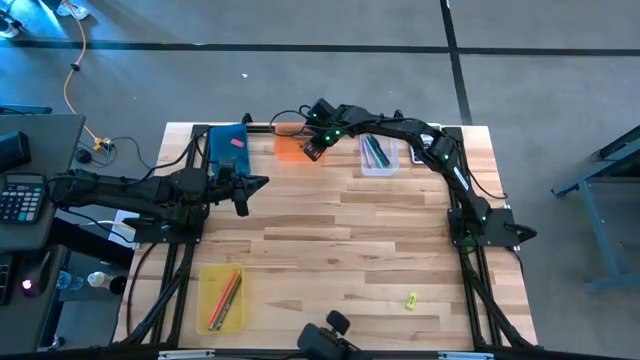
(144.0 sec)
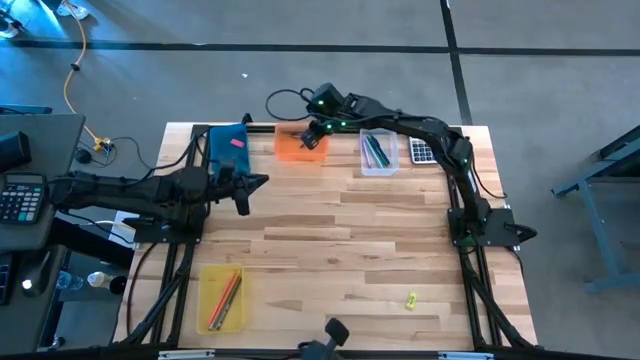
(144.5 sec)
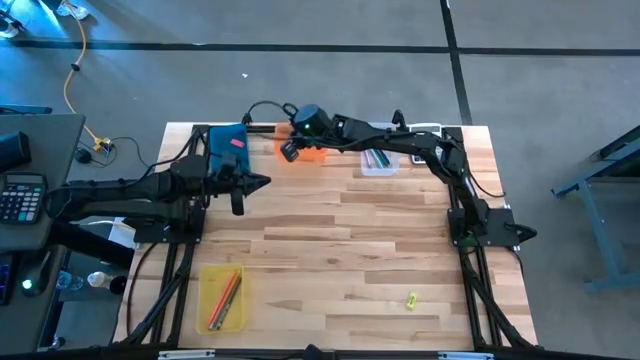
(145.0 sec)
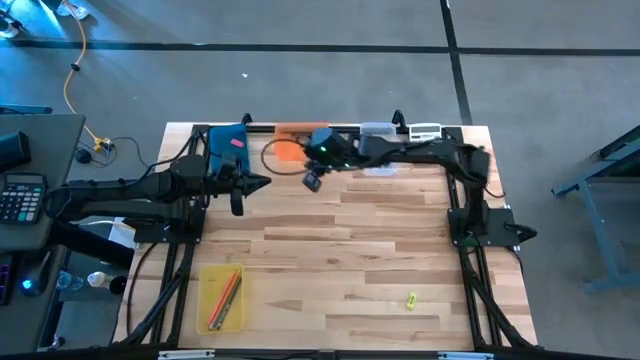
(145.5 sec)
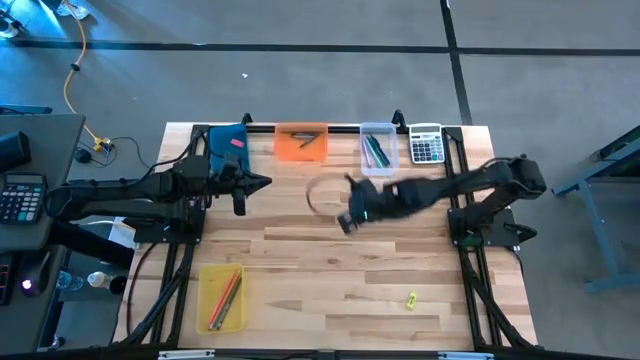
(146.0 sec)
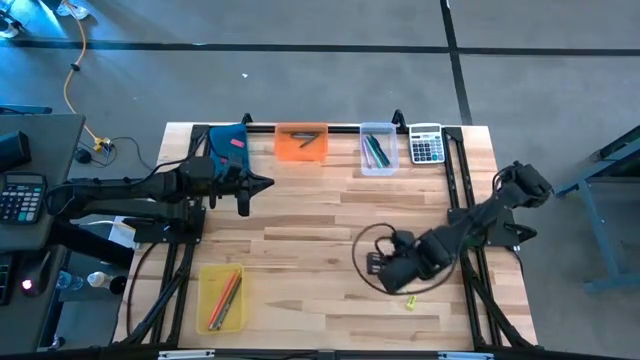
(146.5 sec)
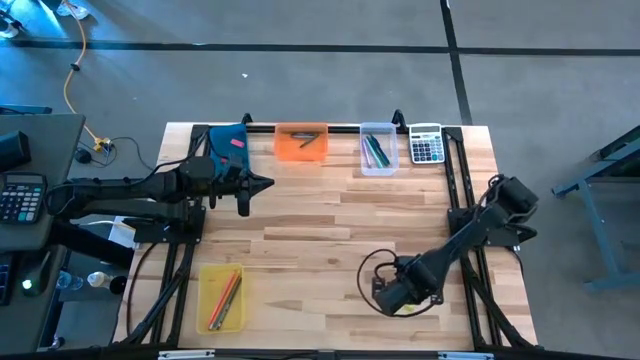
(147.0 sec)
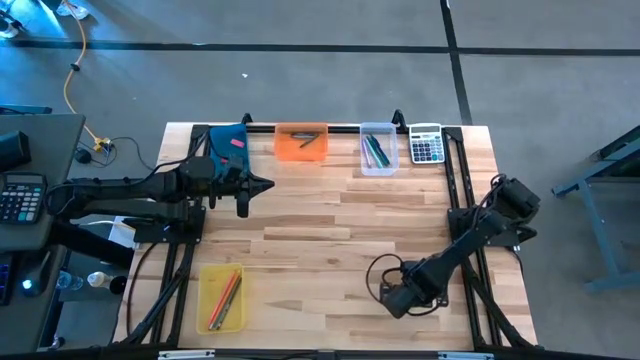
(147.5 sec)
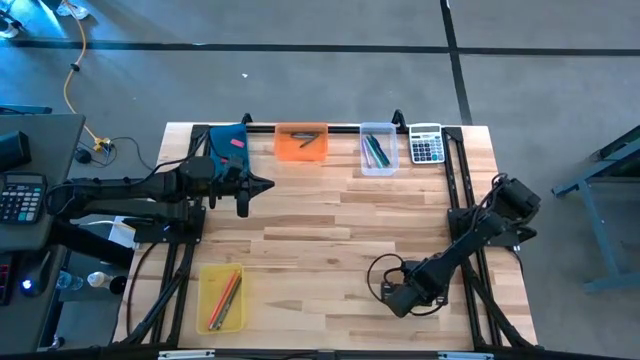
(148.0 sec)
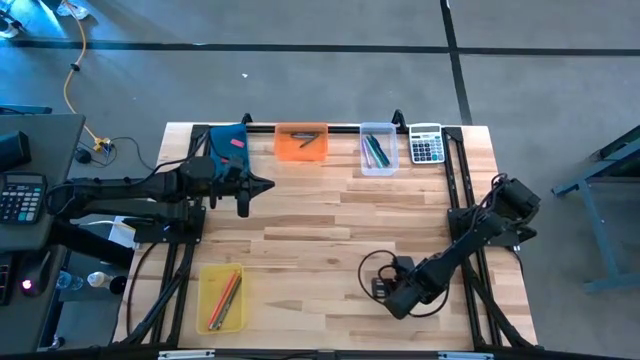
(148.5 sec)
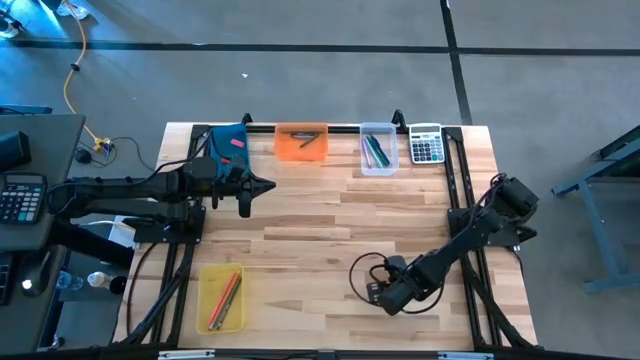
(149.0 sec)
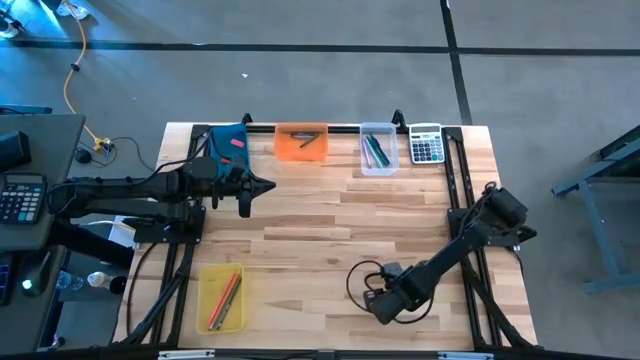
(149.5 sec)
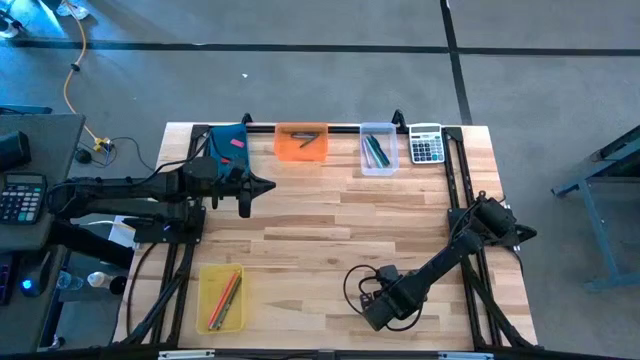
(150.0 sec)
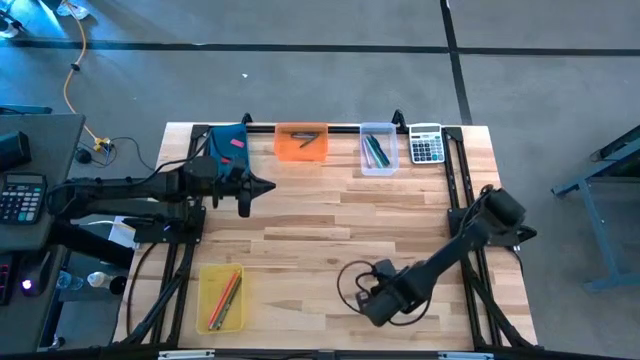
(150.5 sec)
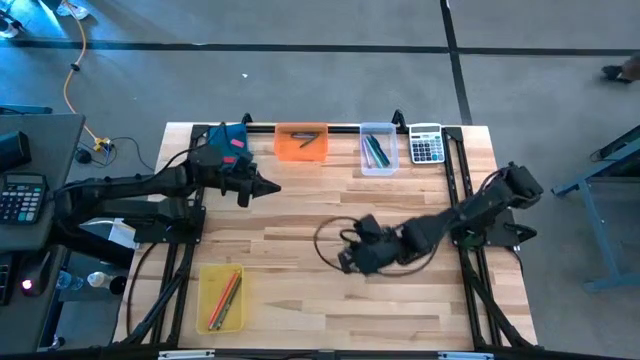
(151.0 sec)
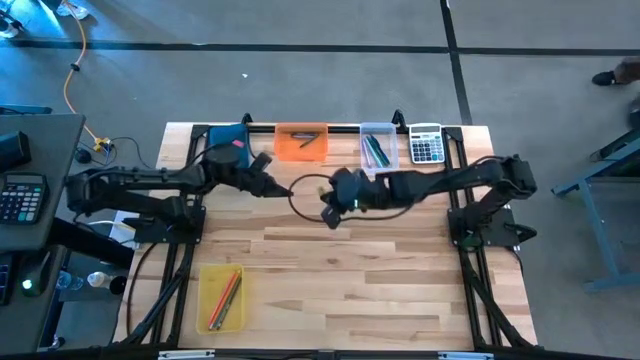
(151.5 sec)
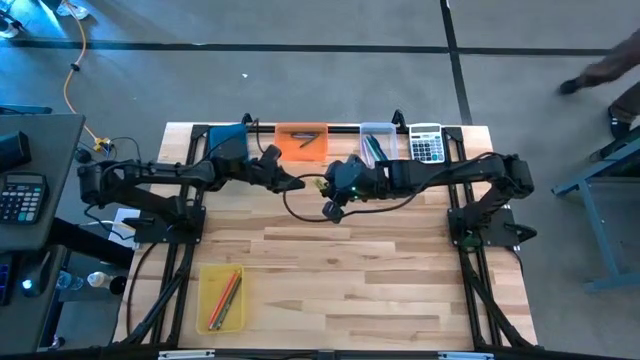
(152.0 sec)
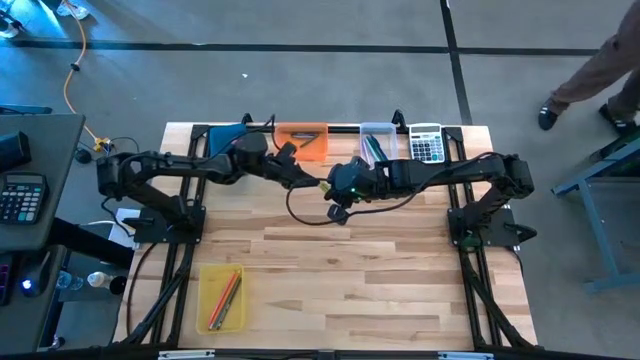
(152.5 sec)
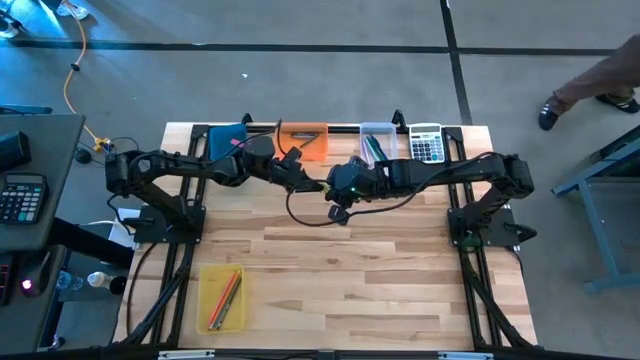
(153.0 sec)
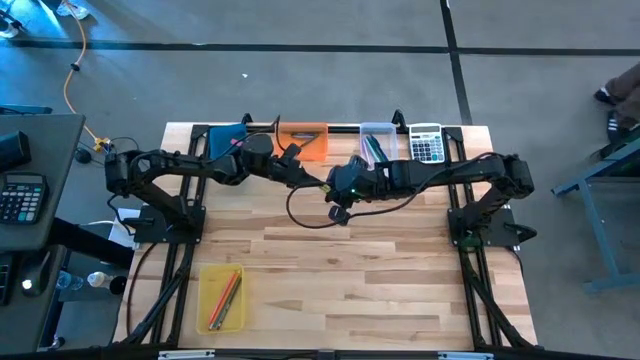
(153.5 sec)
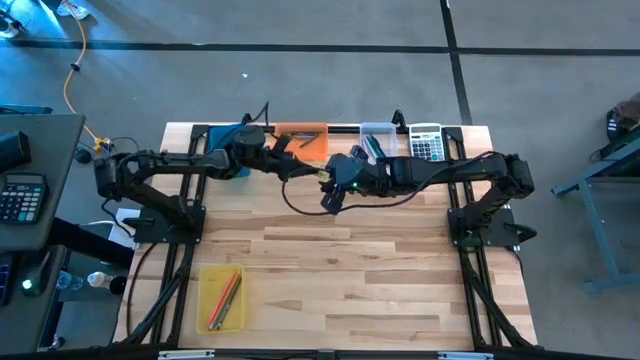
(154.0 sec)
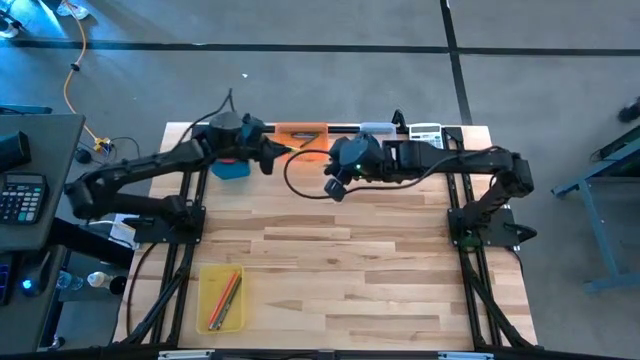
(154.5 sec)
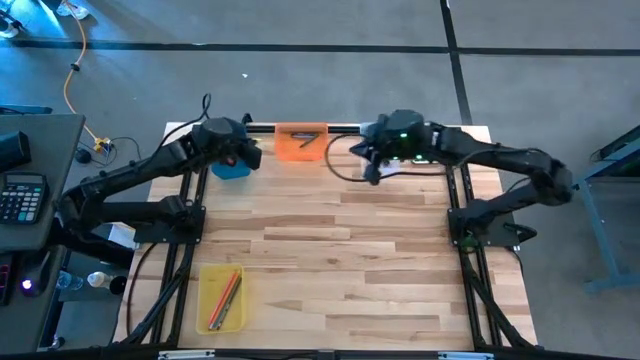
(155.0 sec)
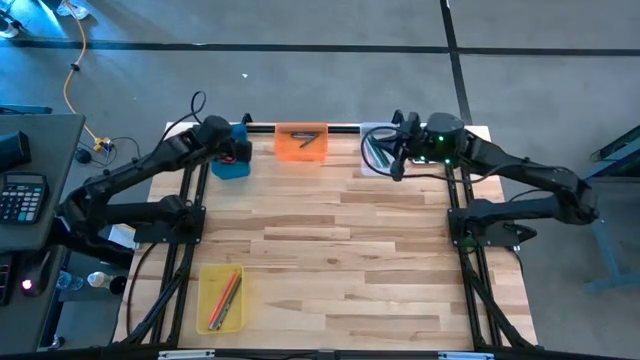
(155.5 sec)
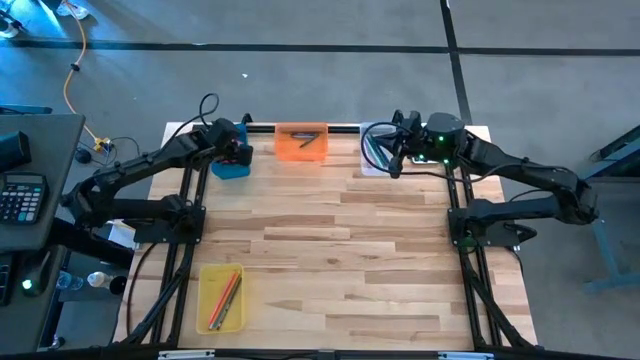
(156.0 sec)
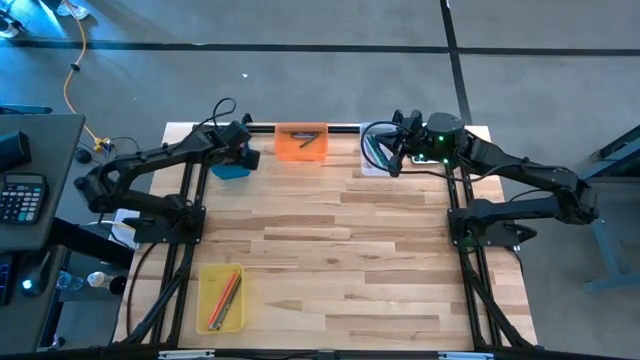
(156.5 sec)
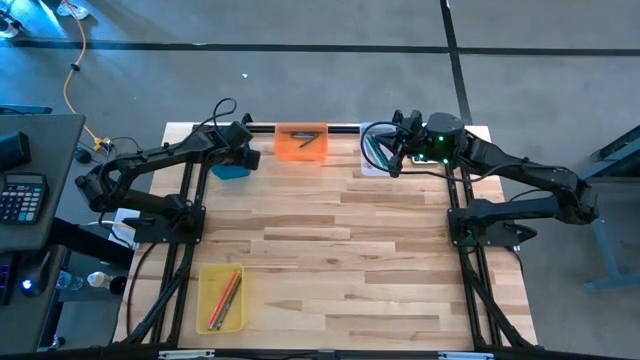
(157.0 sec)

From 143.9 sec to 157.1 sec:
Task: Sort crayons/erasers/pens/pencils in bins
Put the yellow eraser into the blue bin

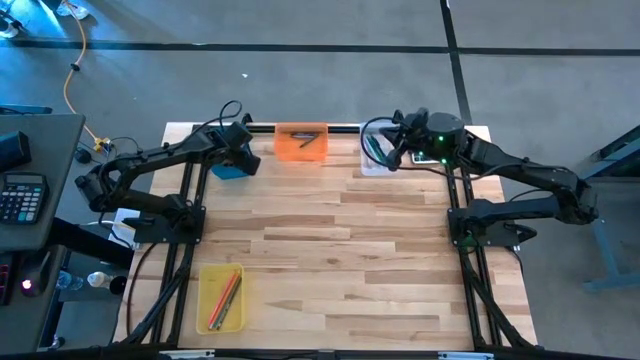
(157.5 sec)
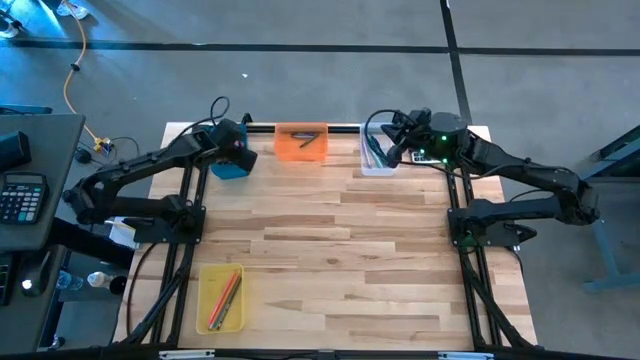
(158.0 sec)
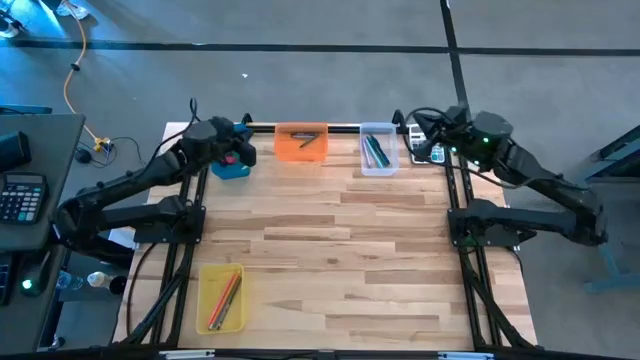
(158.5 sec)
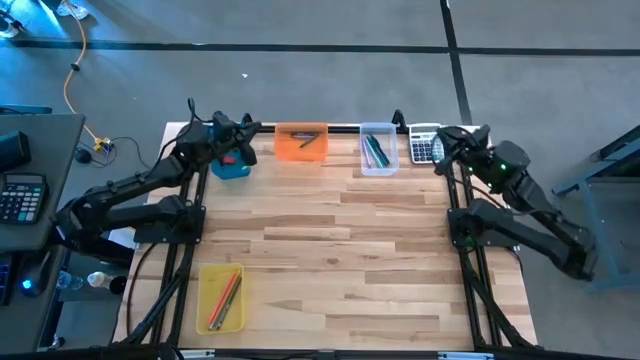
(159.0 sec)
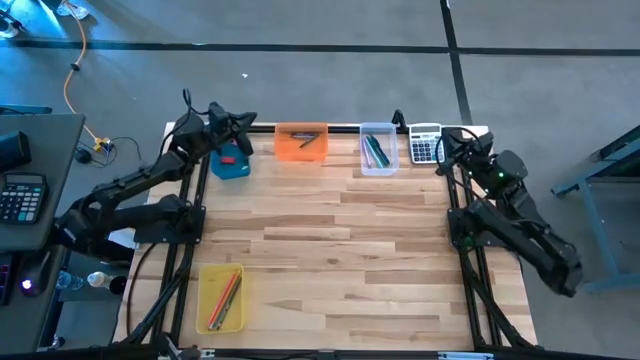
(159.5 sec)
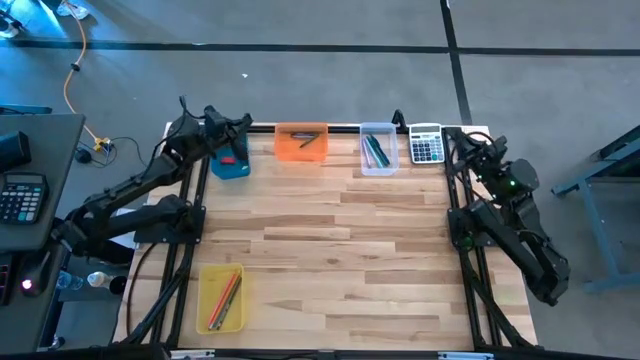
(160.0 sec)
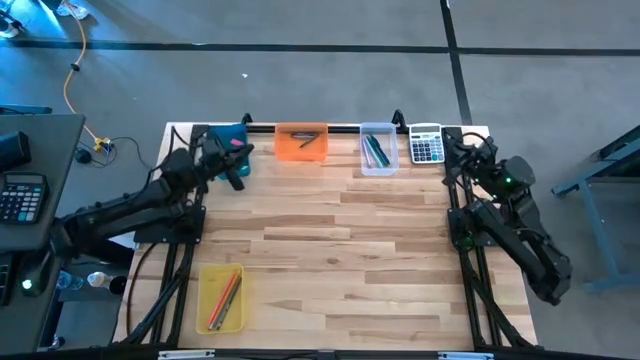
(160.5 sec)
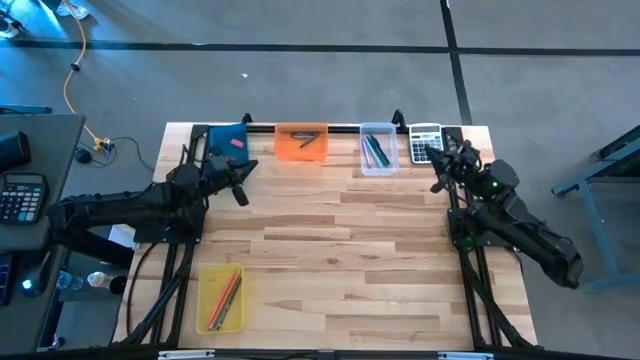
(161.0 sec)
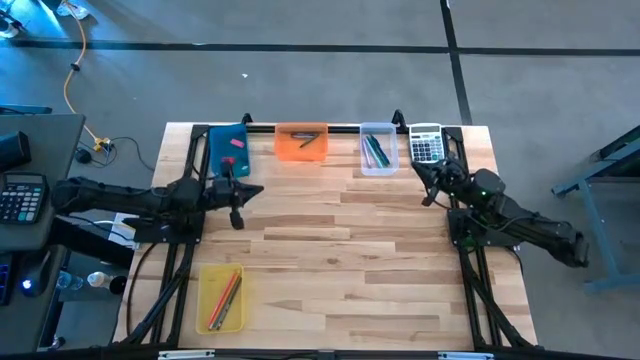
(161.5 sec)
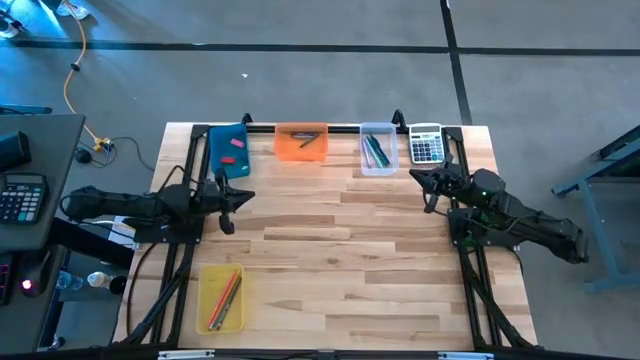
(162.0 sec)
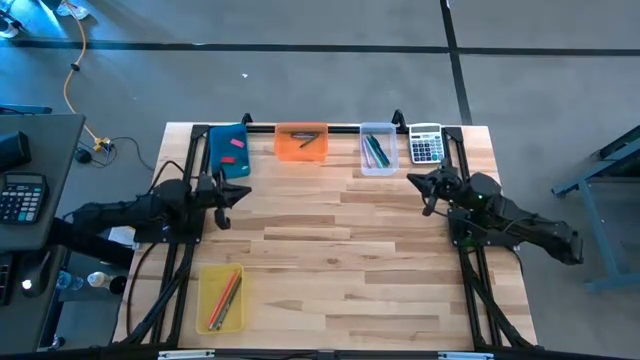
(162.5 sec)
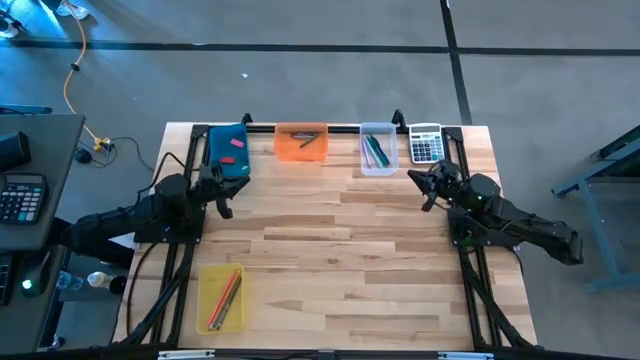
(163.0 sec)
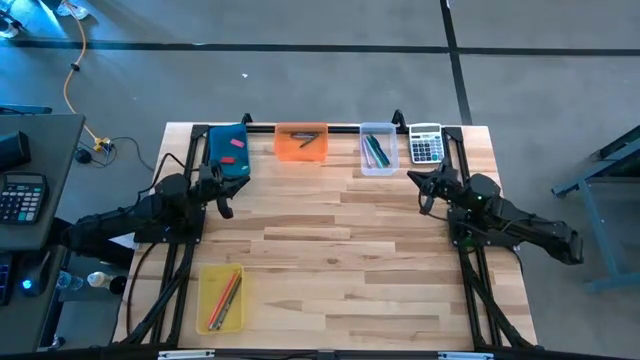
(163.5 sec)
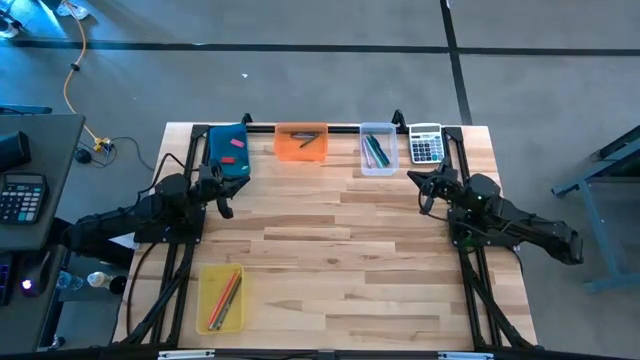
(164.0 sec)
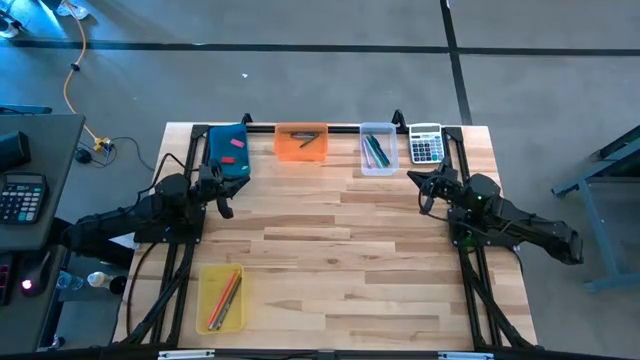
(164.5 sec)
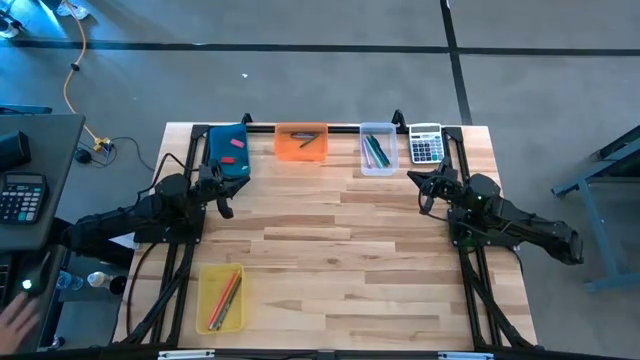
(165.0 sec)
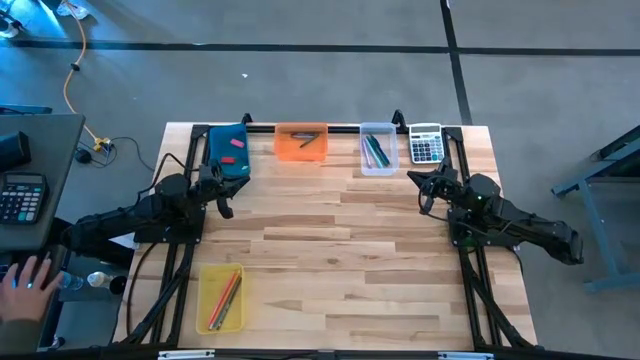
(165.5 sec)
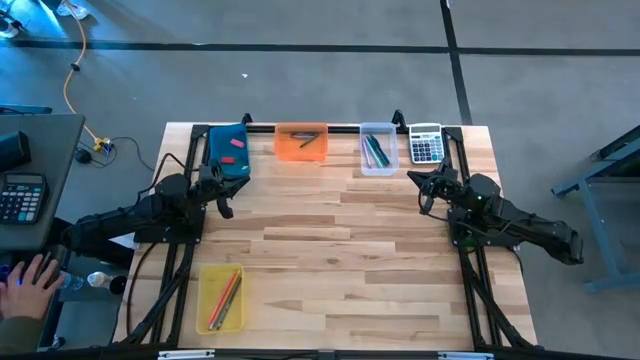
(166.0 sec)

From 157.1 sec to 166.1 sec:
Return to Home Position
